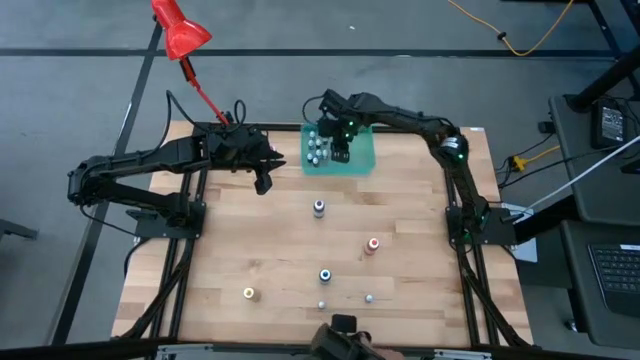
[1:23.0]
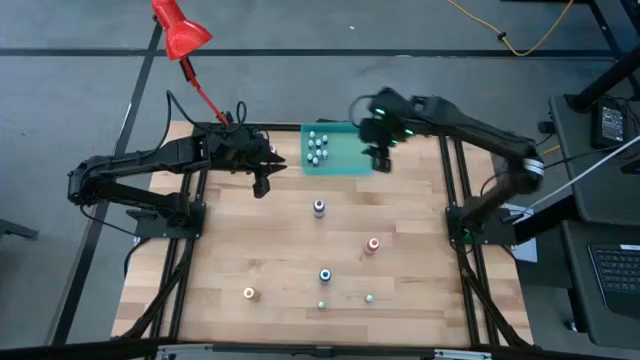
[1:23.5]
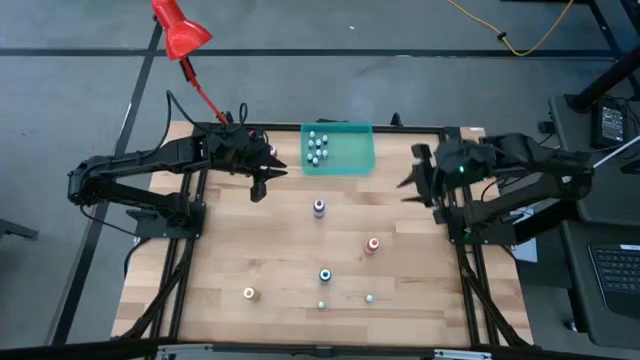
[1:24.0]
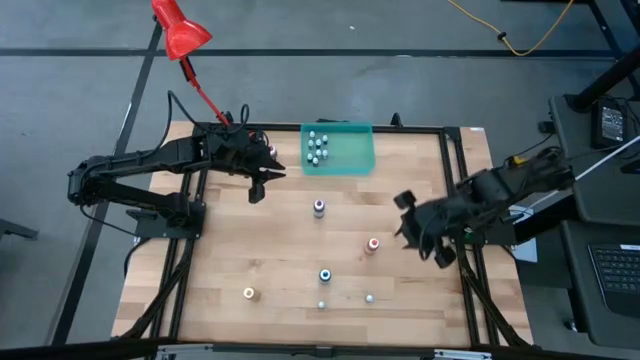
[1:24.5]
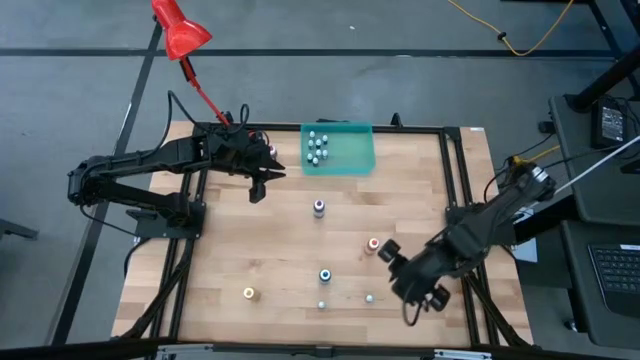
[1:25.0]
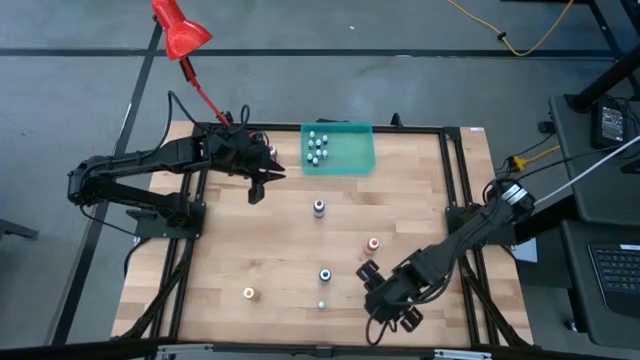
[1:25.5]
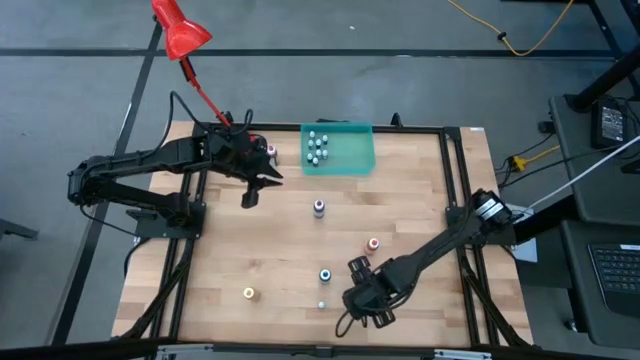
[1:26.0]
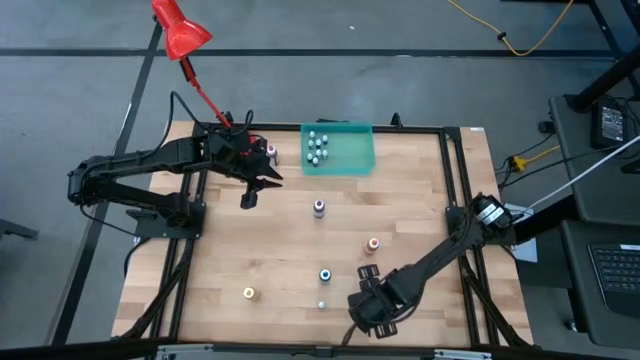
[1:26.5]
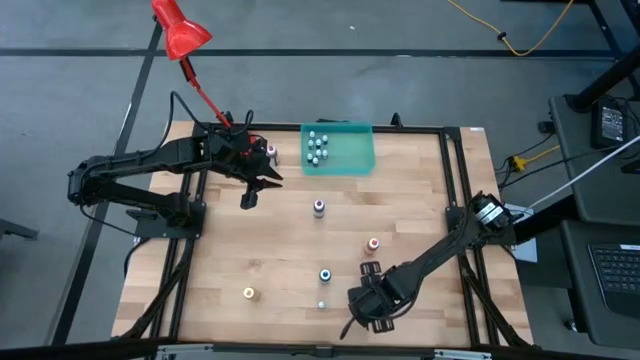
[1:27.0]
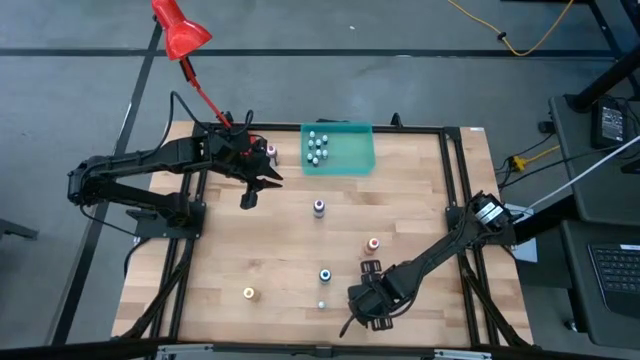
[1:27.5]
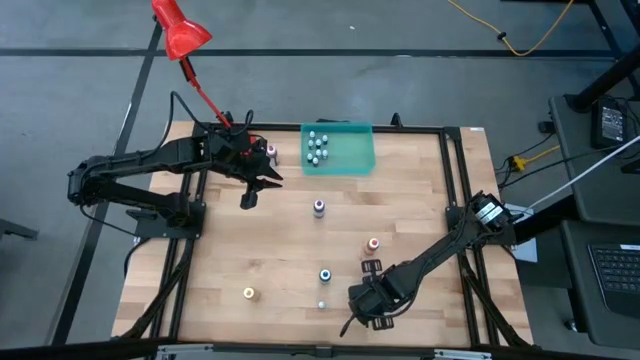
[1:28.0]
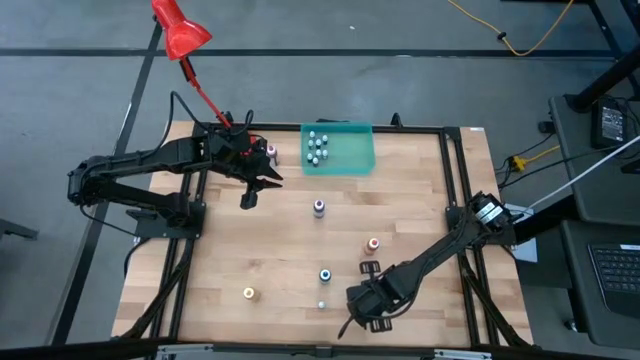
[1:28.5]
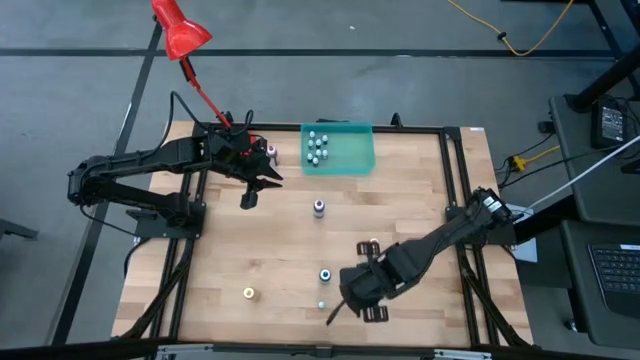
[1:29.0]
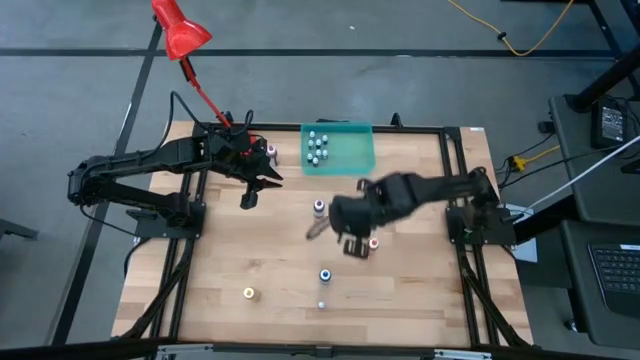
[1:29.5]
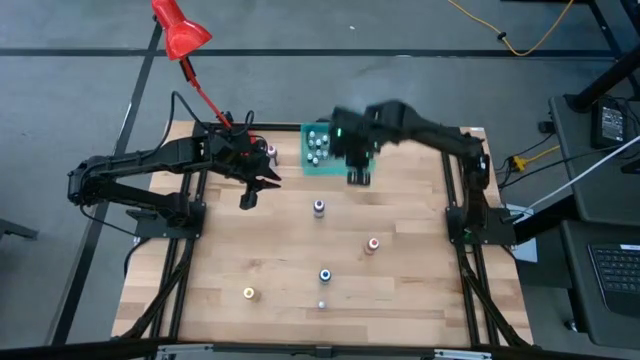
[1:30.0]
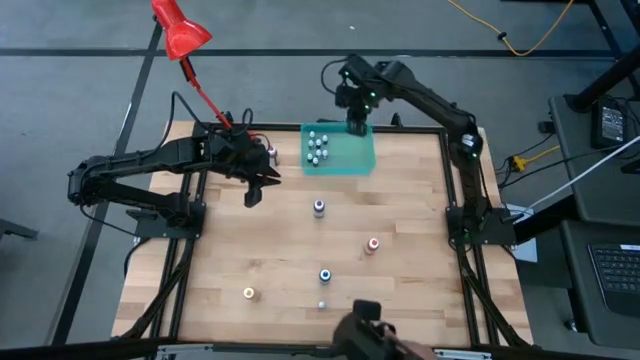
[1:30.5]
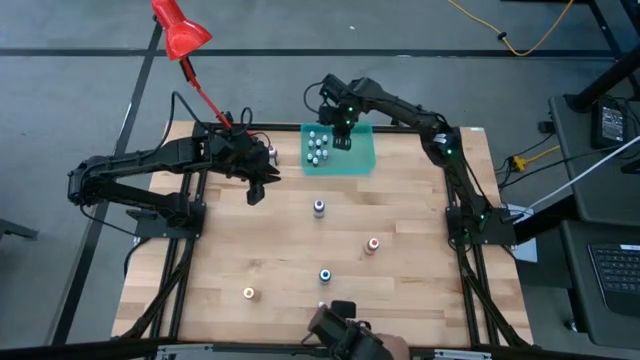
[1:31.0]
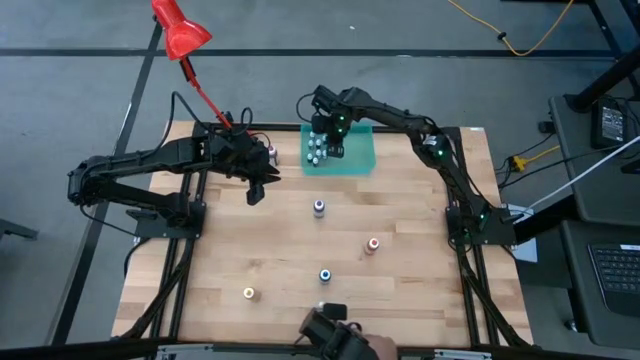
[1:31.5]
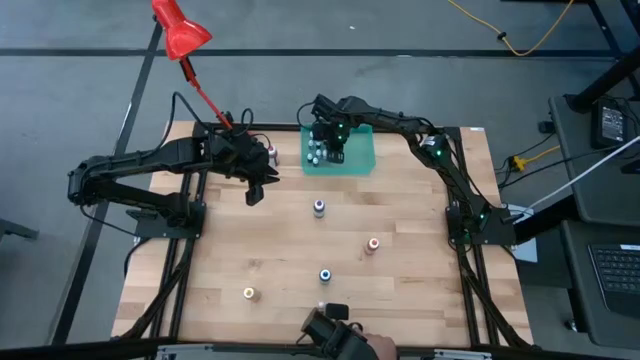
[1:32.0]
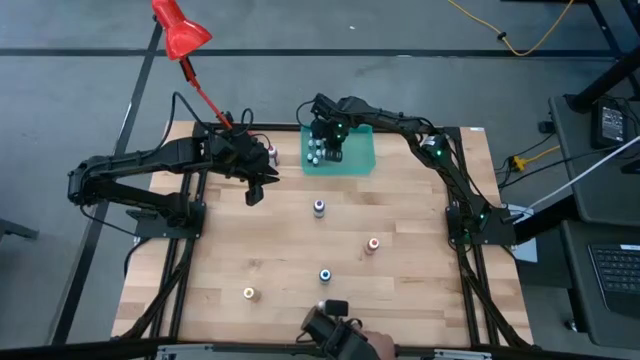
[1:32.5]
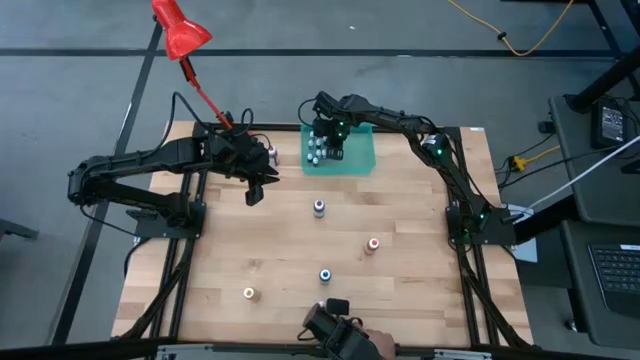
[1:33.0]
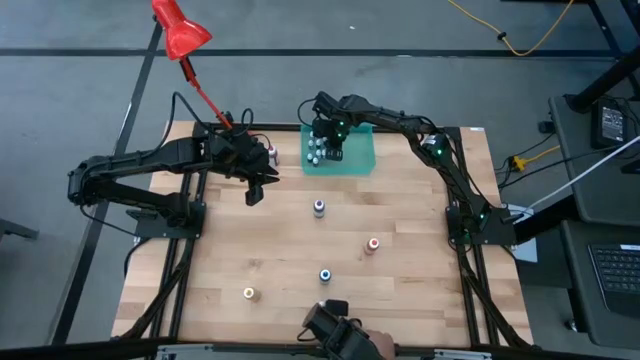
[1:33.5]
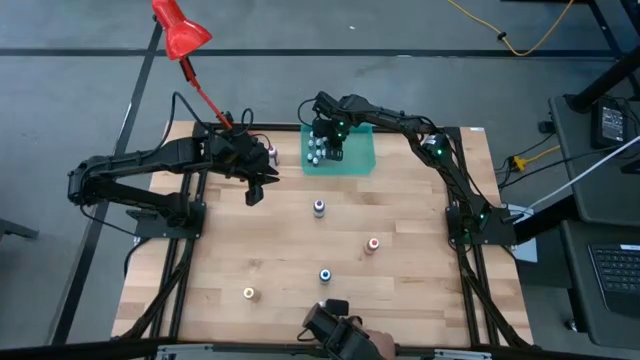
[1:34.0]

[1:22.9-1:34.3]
Task: Pick & Place food coloring
Put the small green food coloring bottle into the green bin

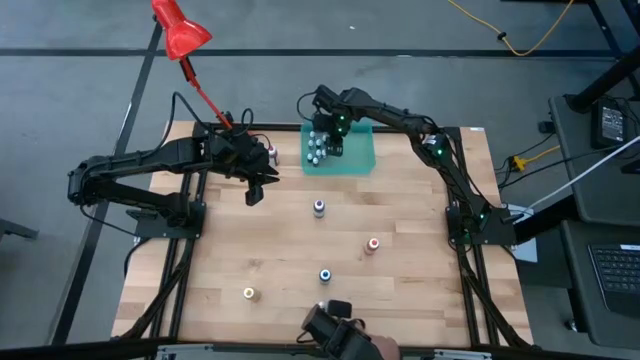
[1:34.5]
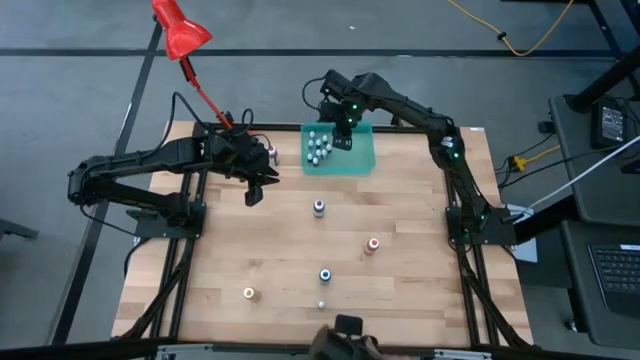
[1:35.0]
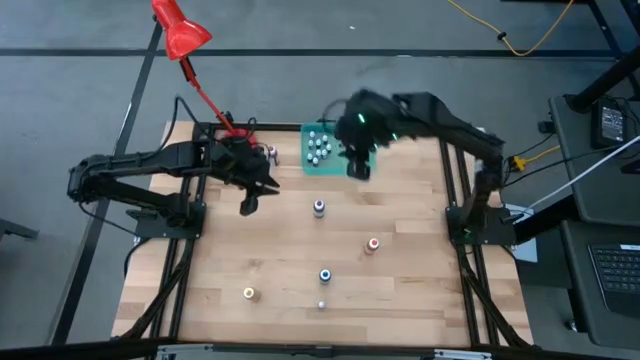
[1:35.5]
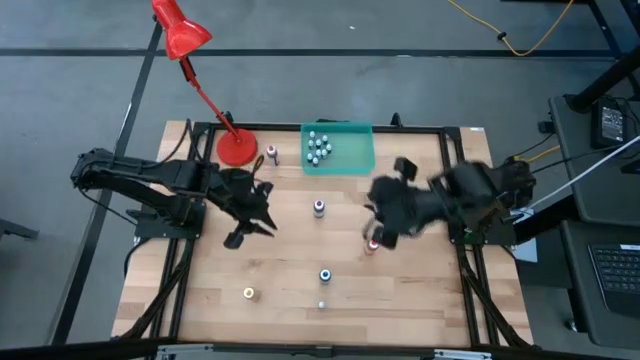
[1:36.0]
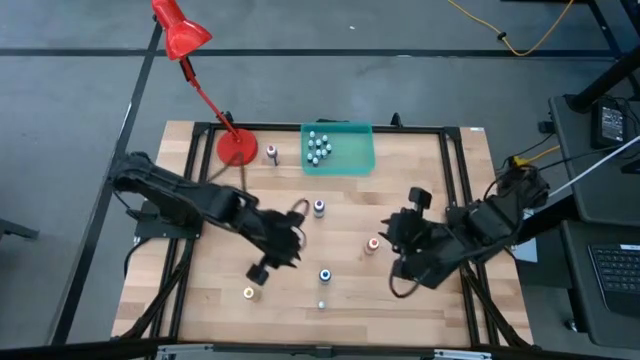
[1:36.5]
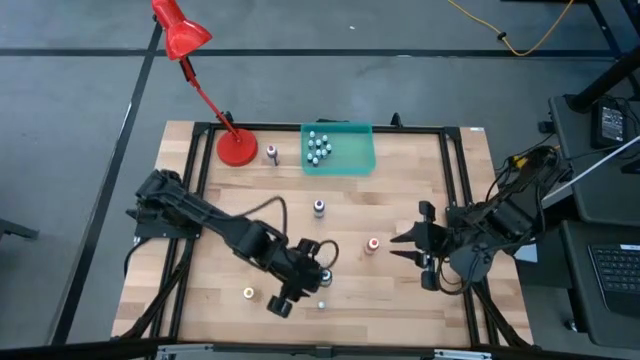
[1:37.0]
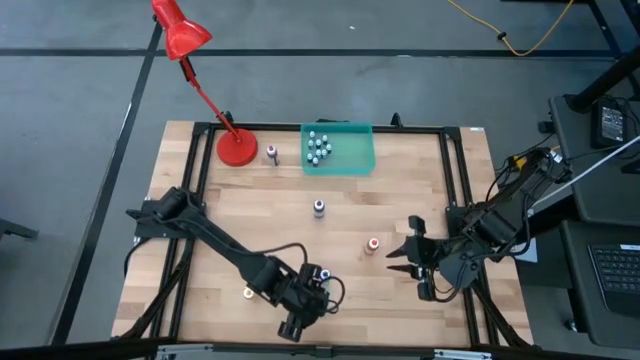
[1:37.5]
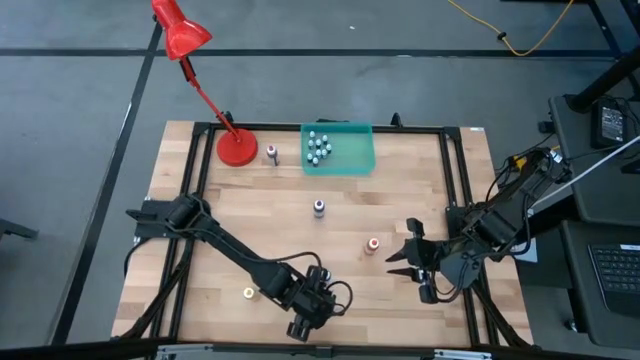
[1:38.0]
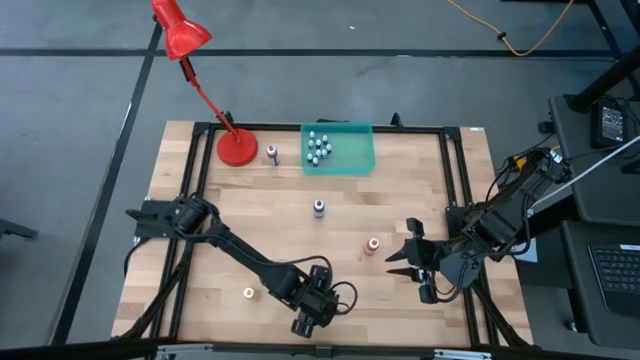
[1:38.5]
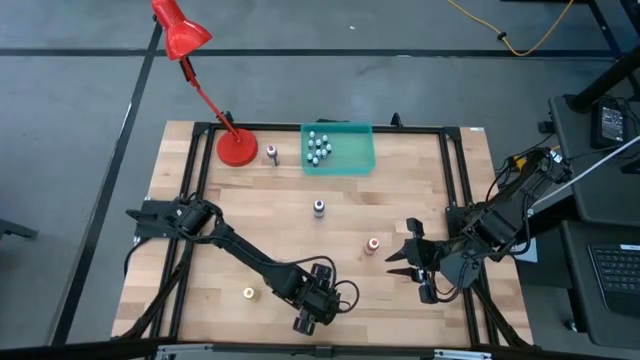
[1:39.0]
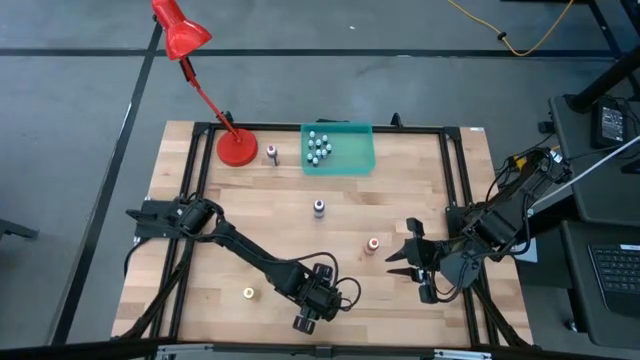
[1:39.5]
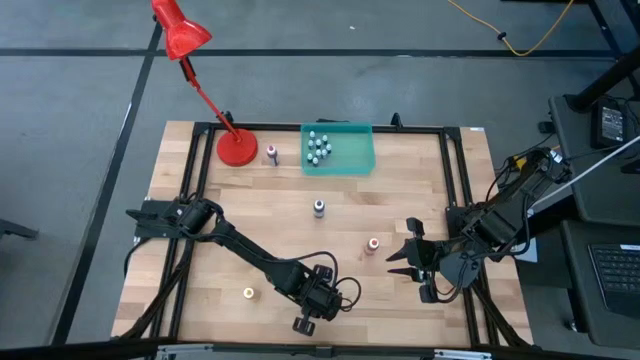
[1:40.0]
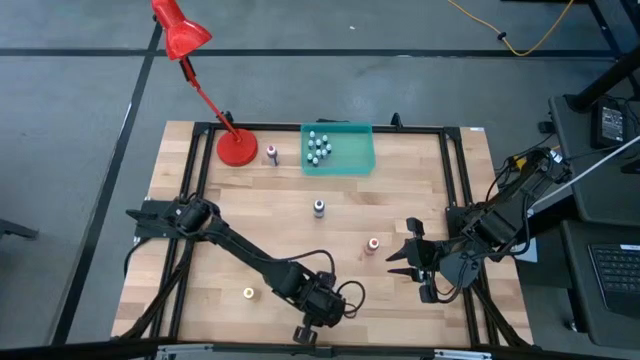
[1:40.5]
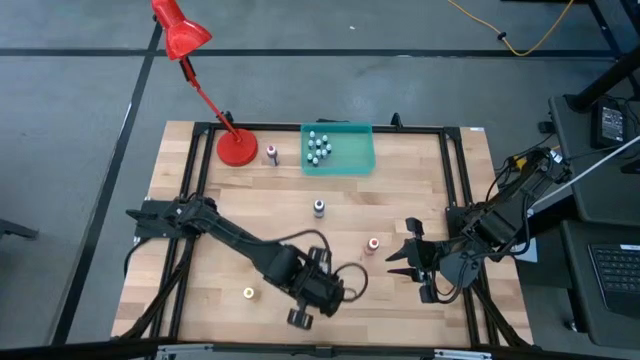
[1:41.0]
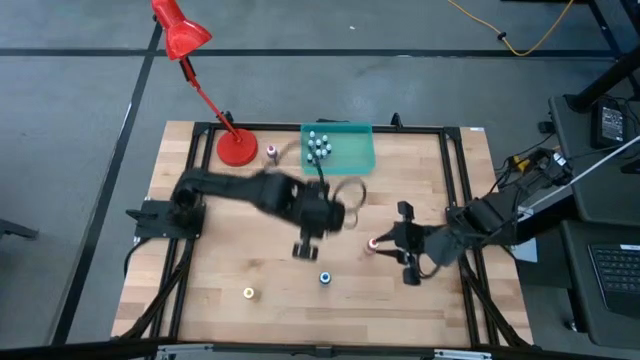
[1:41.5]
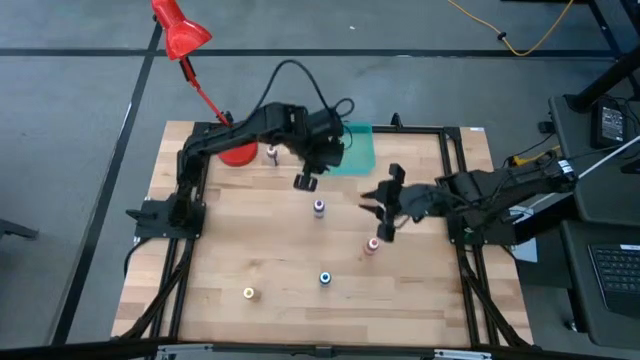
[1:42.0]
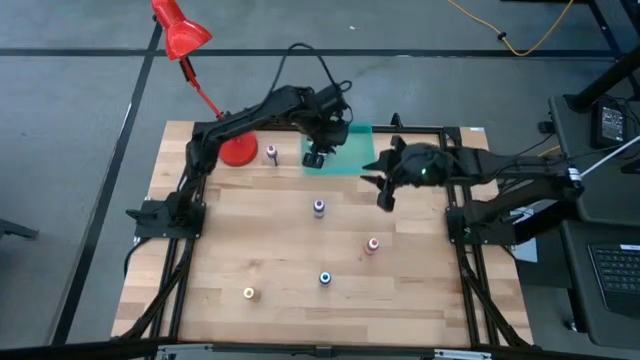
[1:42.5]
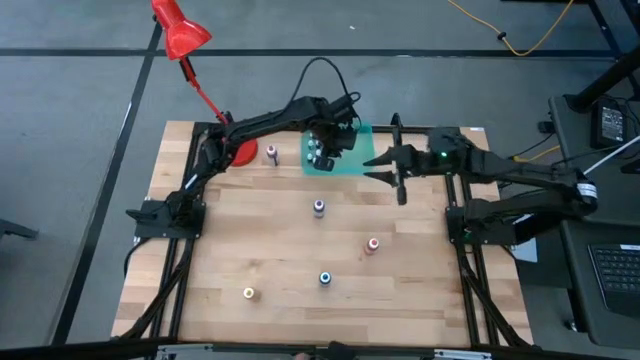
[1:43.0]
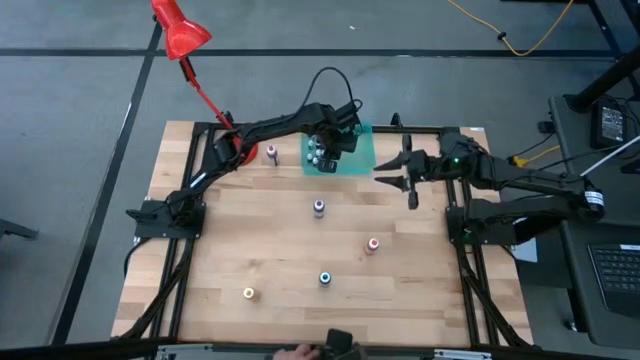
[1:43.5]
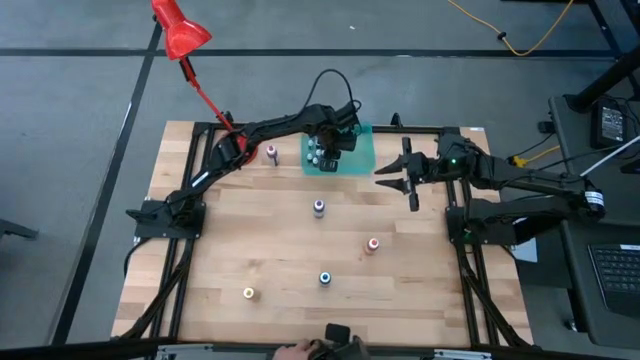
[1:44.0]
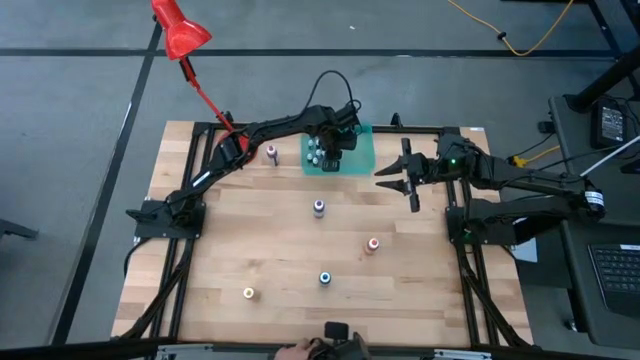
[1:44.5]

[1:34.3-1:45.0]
Put the small black food coloring bottle into the green bin
